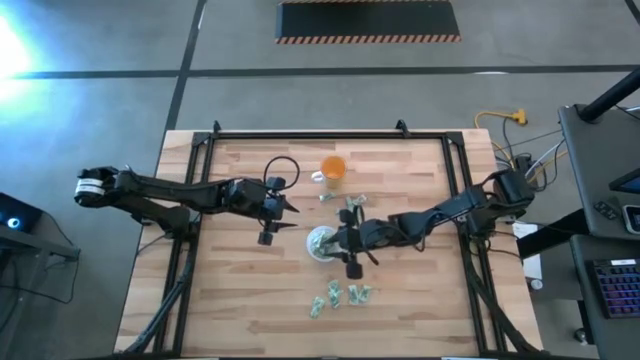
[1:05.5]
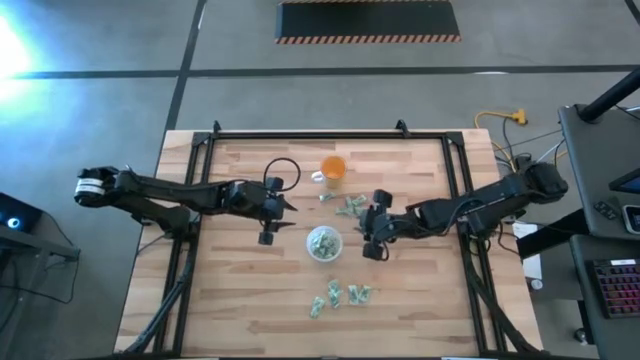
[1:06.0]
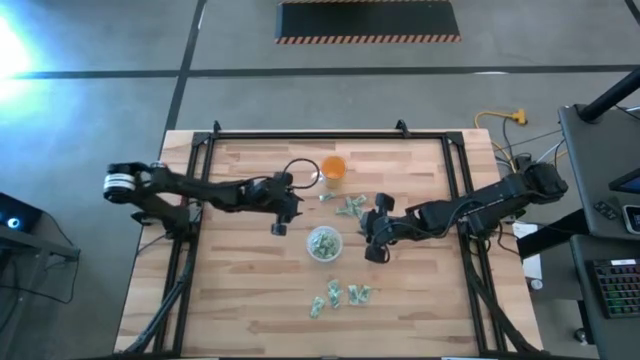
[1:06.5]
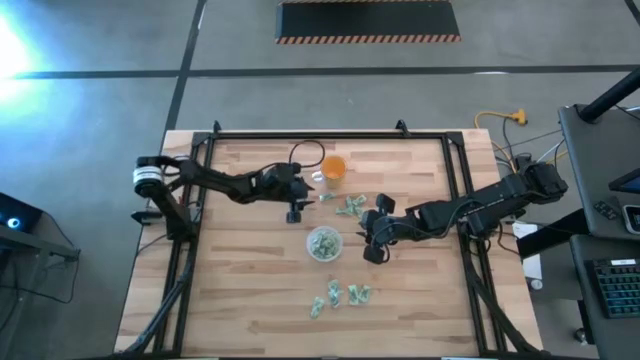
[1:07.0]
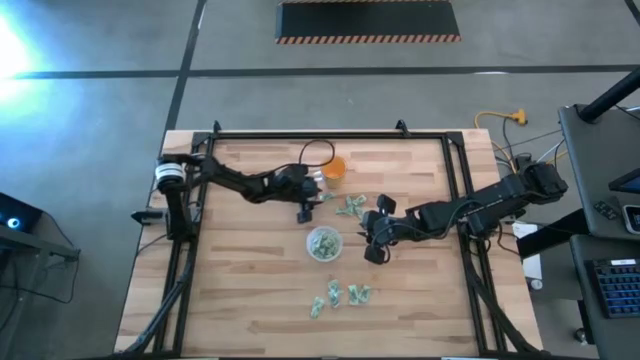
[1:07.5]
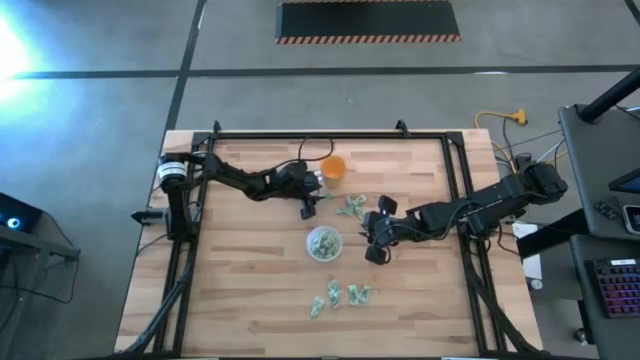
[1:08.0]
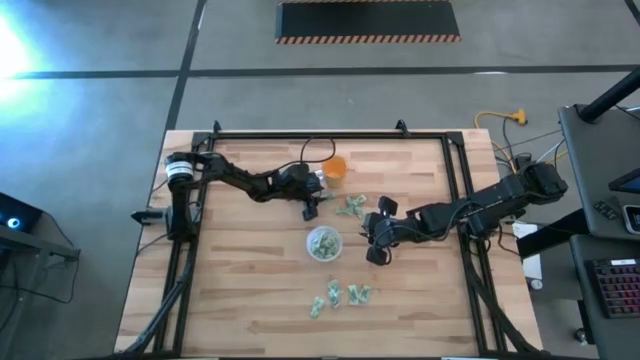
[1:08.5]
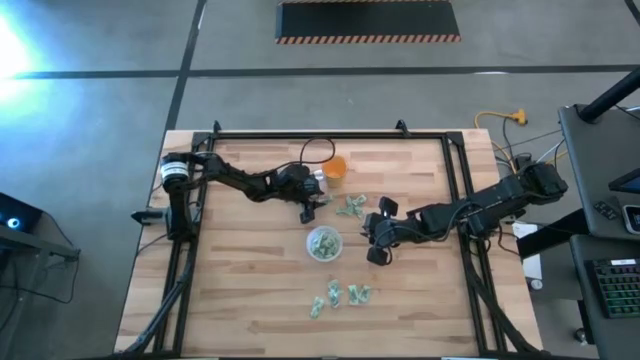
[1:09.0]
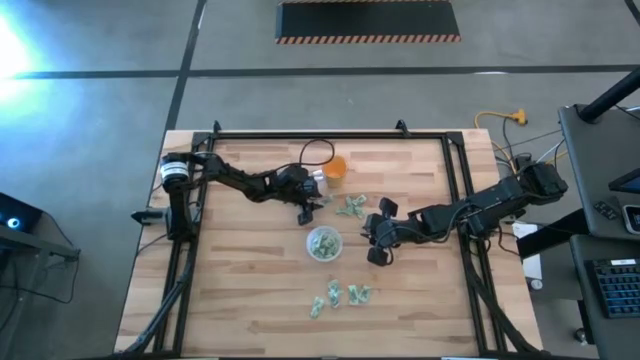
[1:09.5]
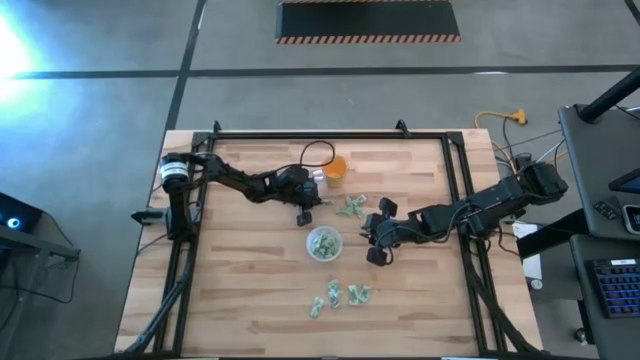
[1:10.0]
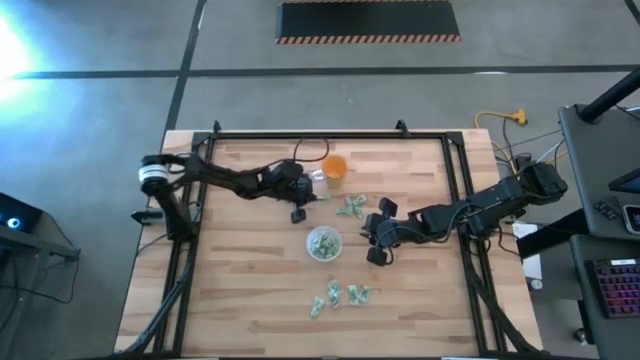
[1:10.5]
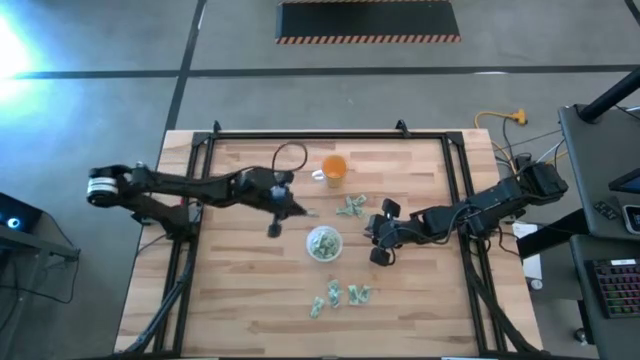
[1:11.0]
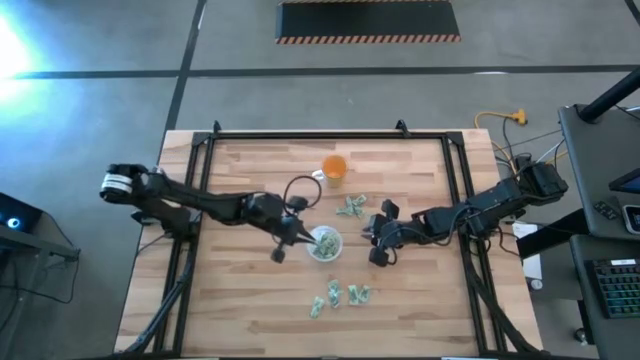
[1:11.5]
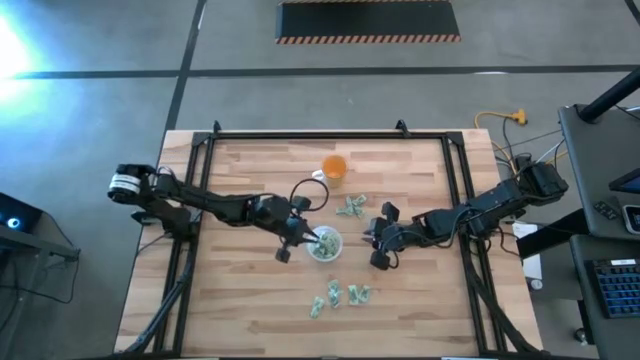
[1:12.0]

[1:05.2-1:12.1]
Task: Pick and place Stevia / Truvia into bins
Put the green stevia packet into the transparent container

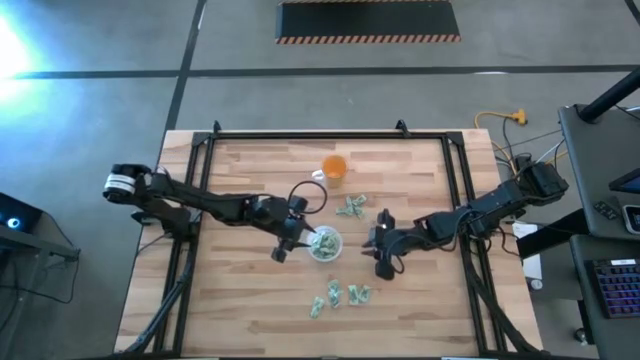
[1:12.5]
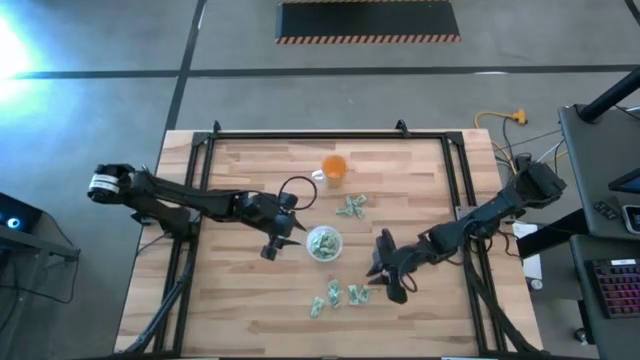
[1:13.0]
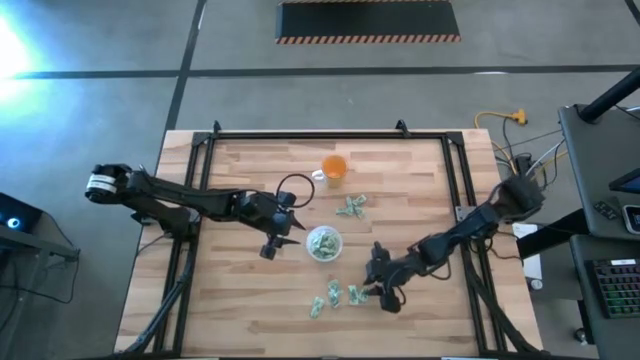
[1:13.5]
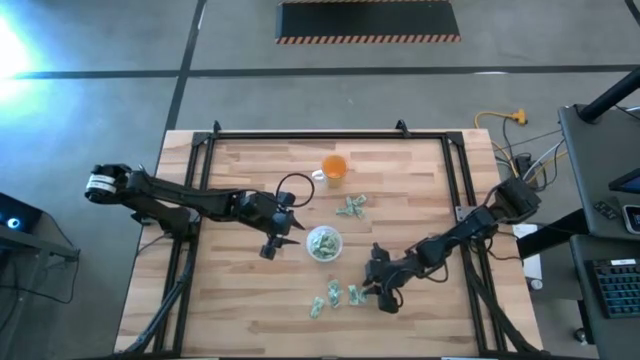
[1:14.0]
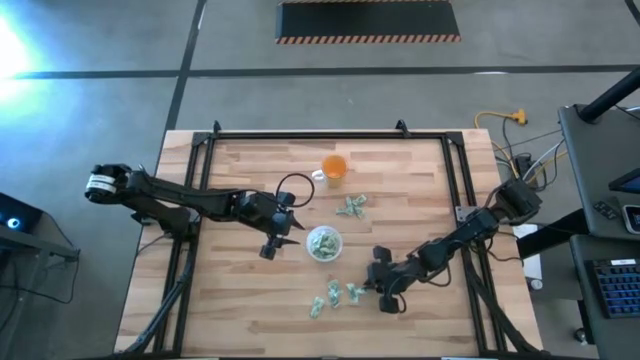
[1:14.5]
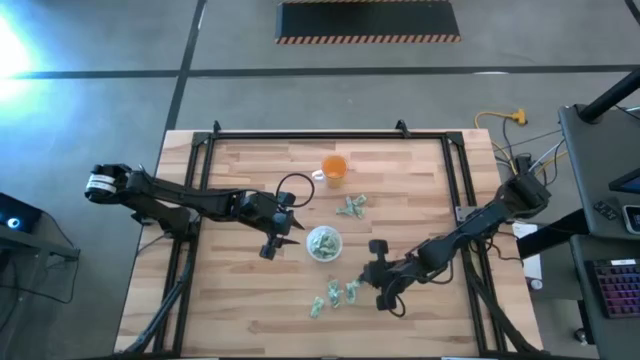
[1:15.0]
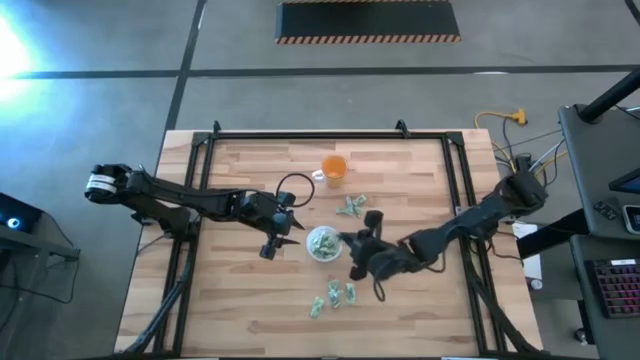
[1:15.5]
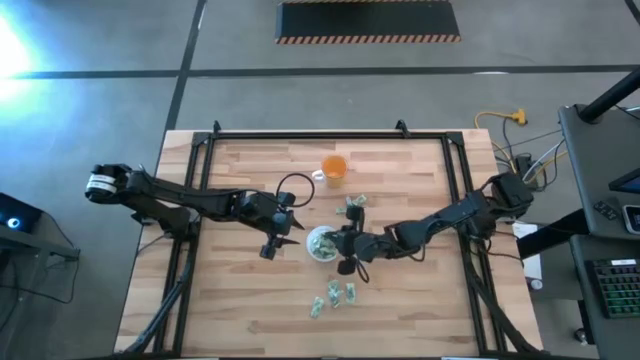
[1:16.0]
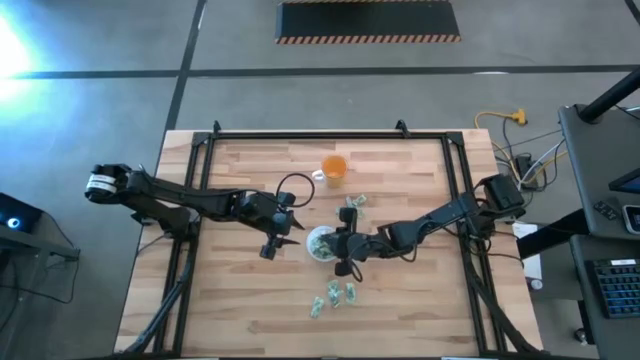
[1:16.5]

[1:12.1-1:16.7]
Put the green stevia packet into the transparent container

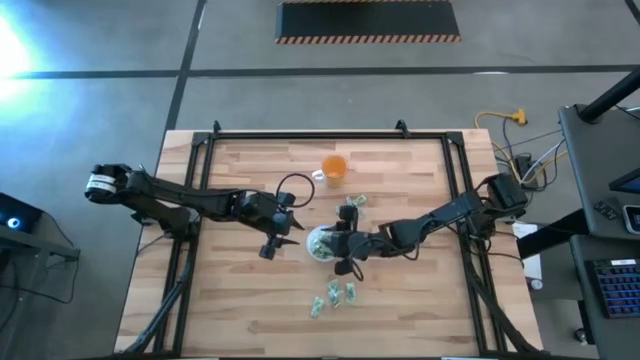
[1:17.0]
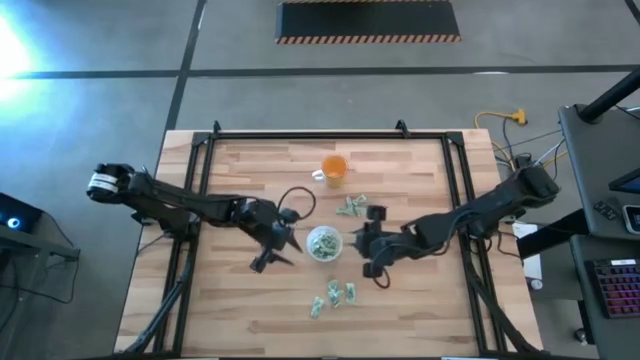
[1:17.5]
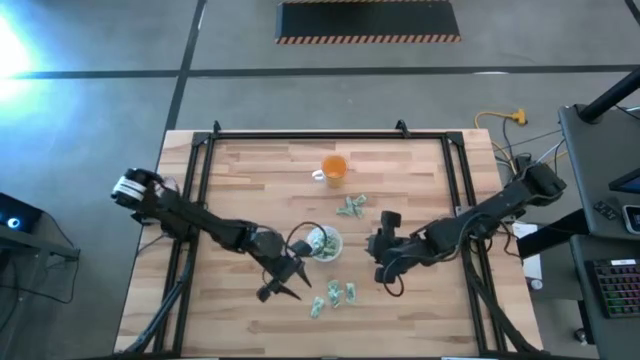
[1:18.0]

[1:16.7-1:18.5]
Put the green stevia packet into the transparent container

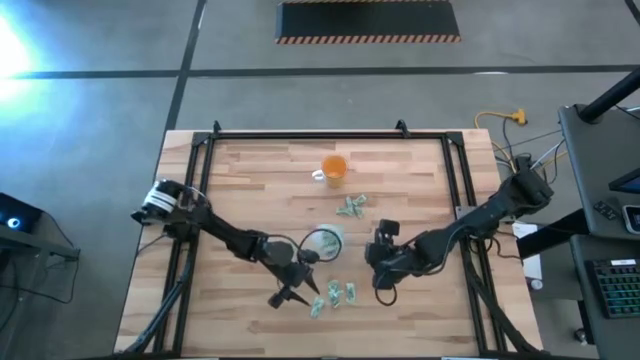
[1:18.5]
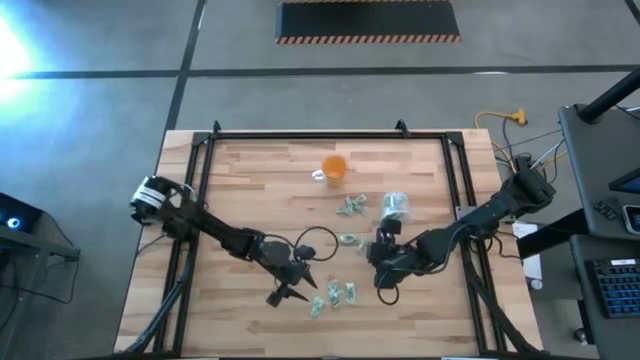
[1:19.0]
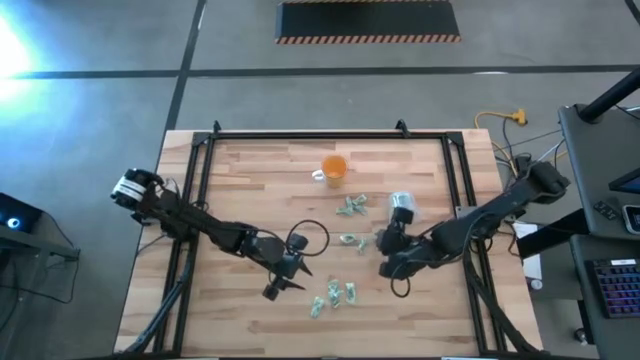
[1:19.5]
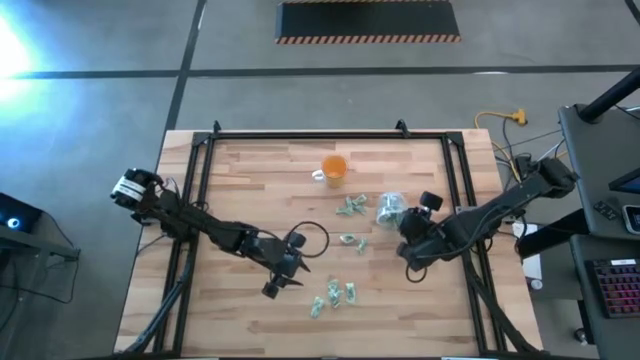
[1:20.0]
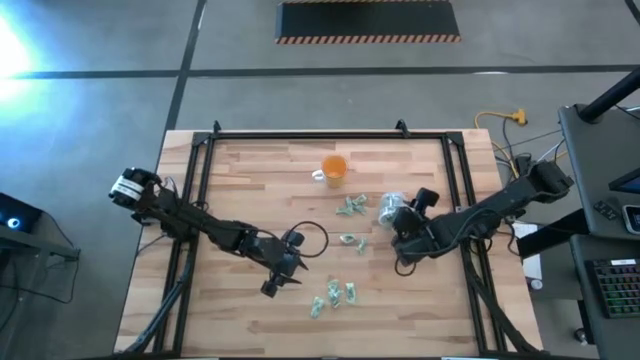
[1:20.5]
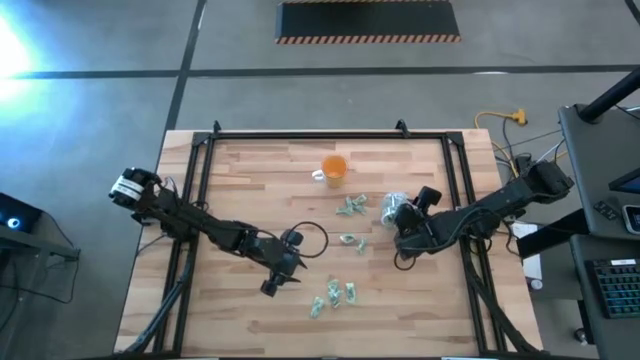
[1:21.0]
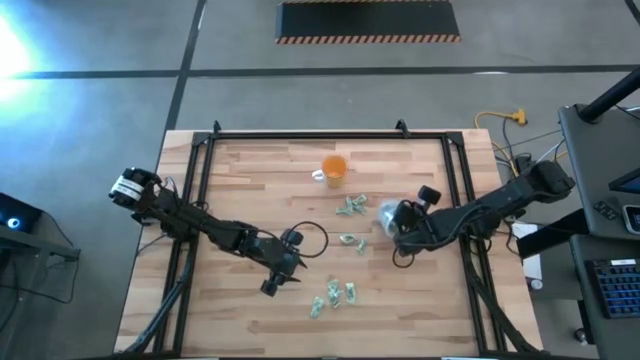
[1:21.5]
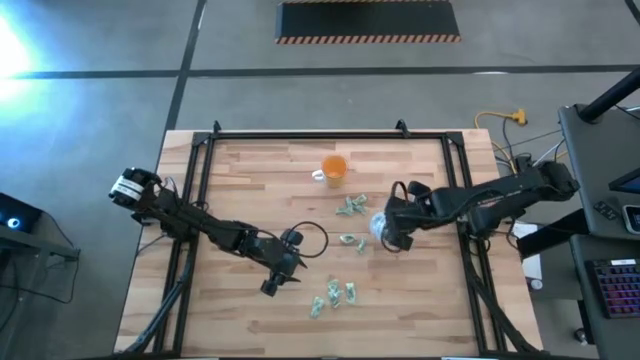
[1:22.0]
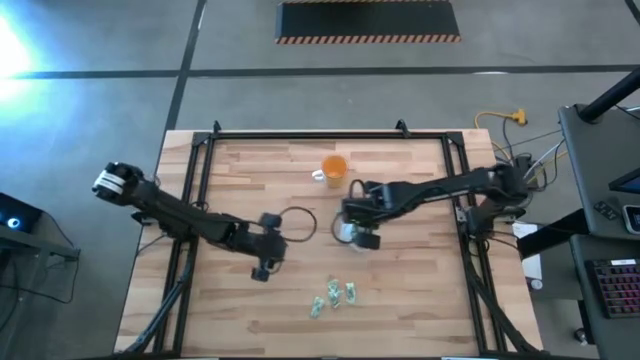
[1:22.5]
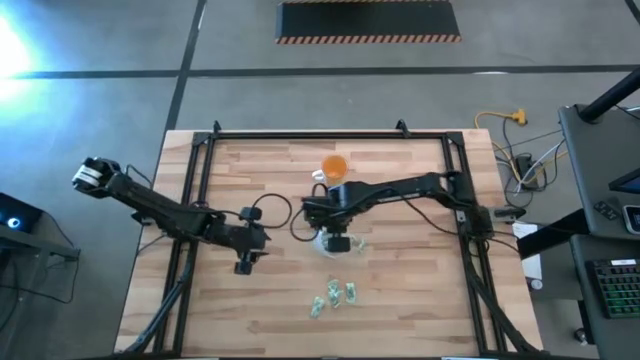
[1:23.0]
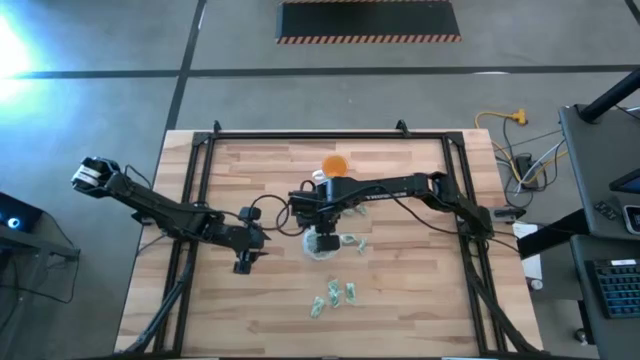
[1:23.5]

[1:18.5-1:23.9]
Adjust the transparent container

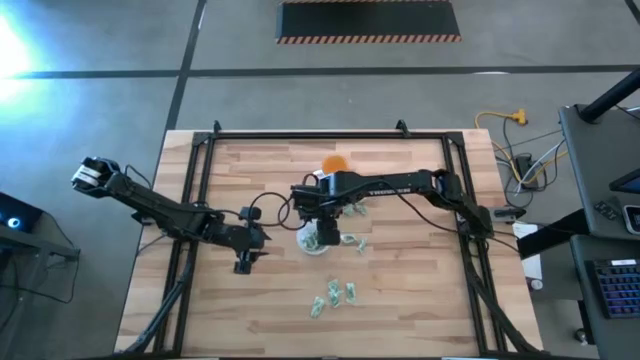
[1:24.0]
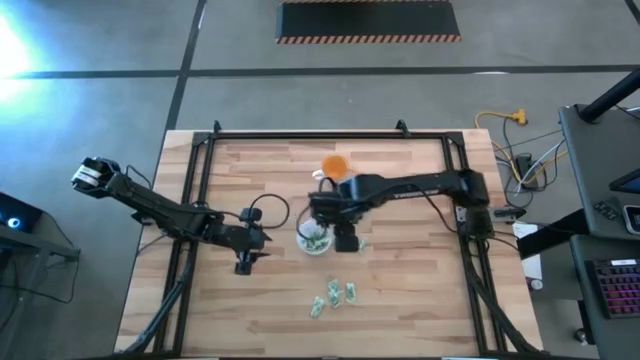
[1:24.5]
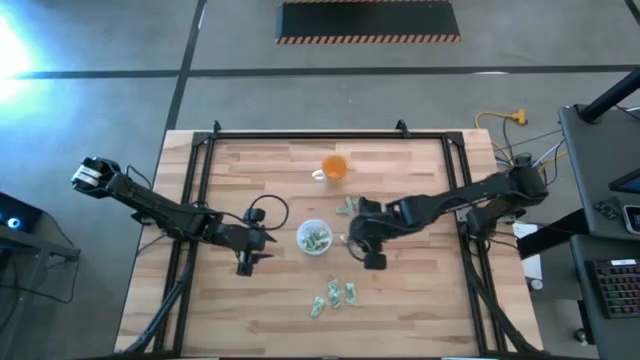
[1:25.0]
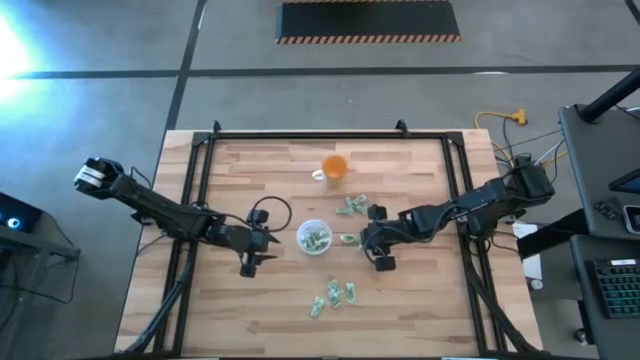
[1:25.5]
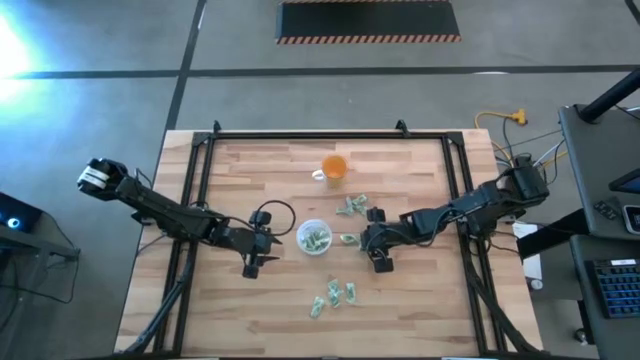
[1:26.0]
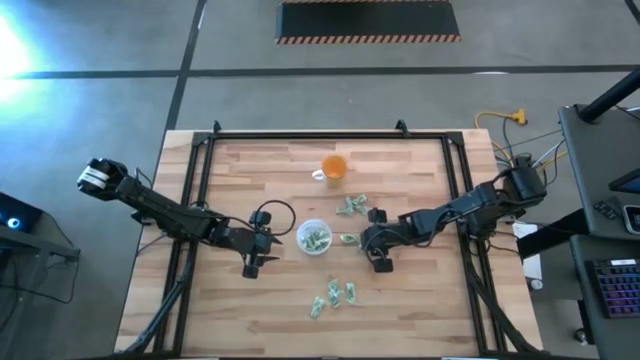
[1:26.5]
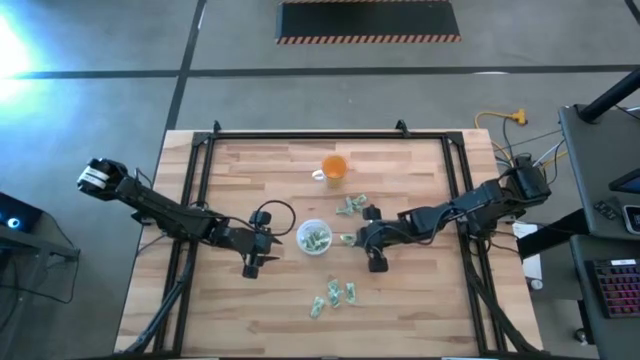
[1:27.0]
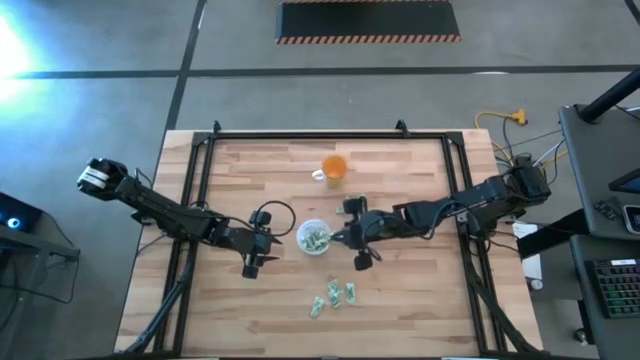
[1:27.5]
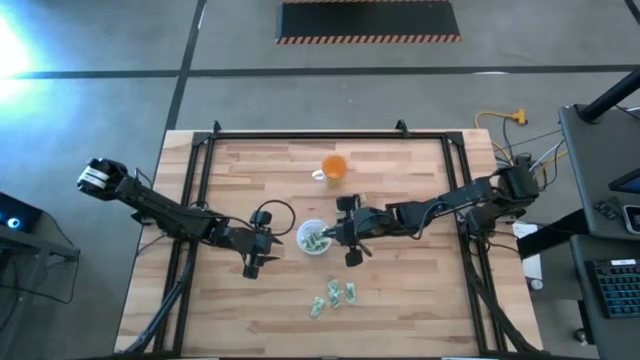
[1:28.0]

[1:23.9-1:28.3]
Put the green stevia packet into the transparent container
